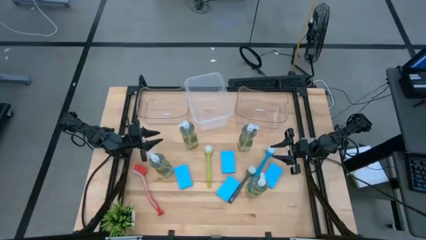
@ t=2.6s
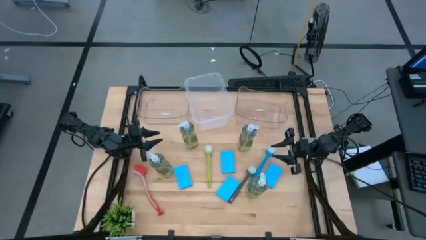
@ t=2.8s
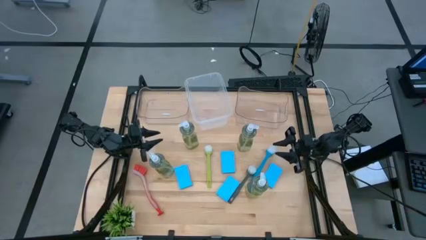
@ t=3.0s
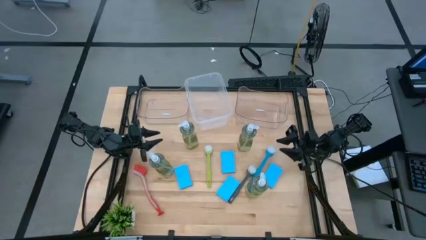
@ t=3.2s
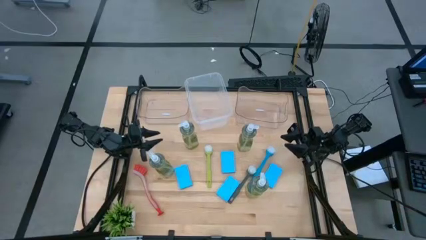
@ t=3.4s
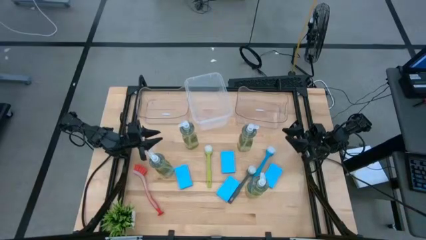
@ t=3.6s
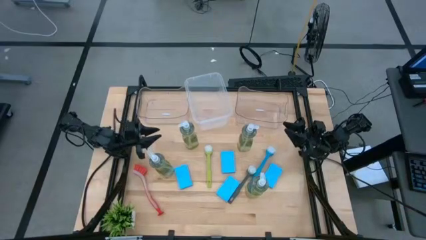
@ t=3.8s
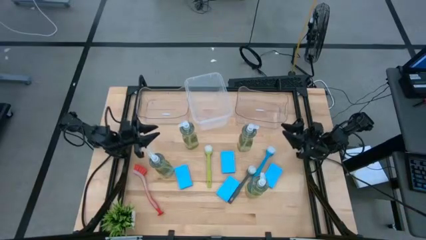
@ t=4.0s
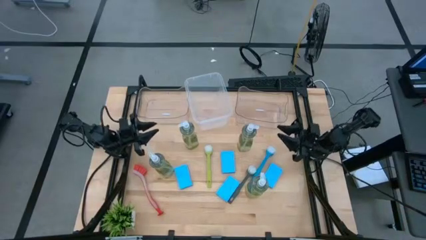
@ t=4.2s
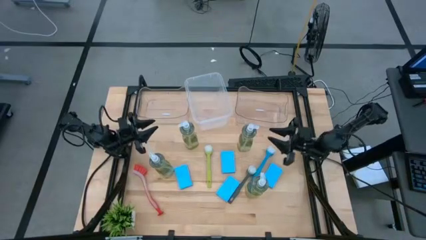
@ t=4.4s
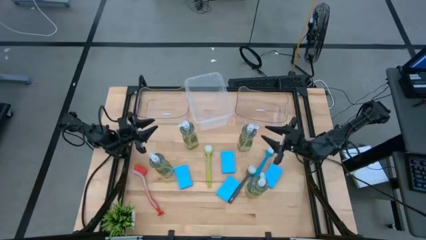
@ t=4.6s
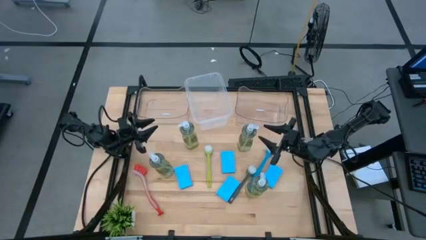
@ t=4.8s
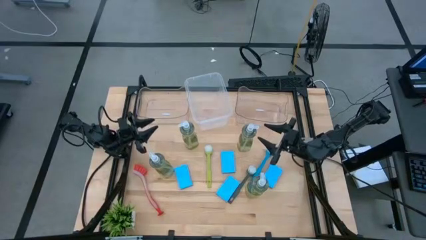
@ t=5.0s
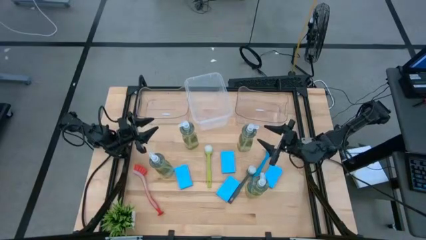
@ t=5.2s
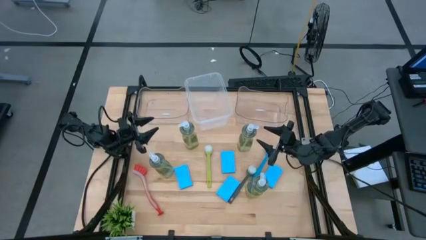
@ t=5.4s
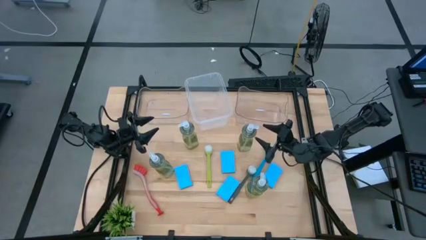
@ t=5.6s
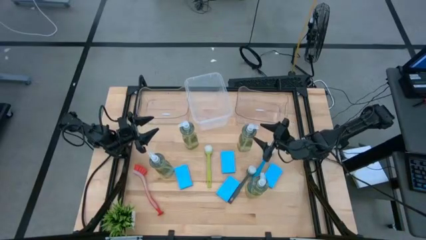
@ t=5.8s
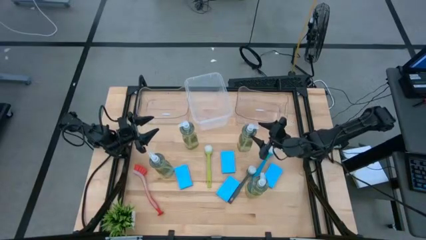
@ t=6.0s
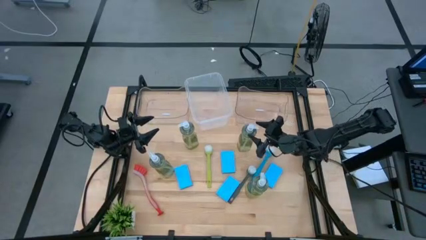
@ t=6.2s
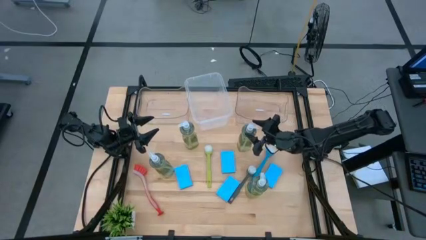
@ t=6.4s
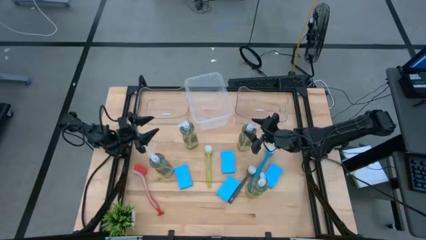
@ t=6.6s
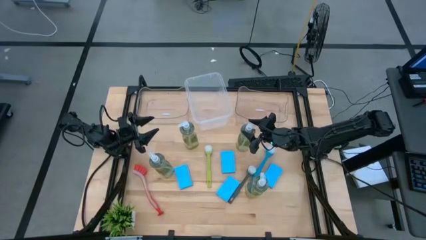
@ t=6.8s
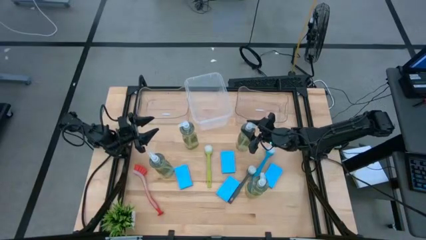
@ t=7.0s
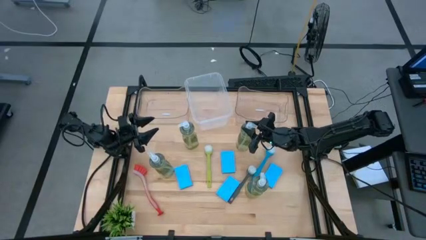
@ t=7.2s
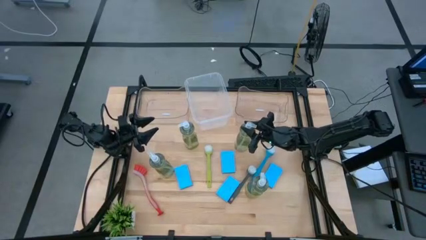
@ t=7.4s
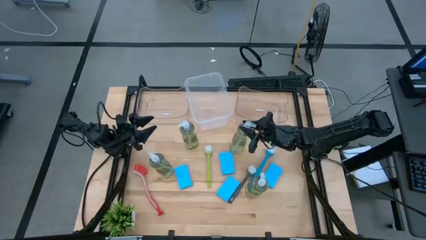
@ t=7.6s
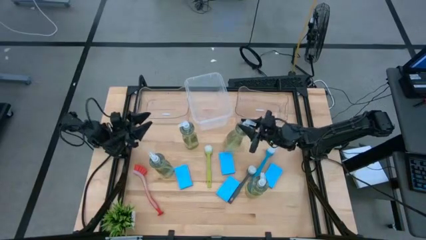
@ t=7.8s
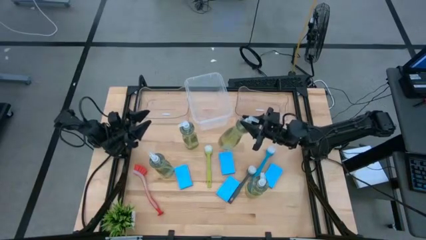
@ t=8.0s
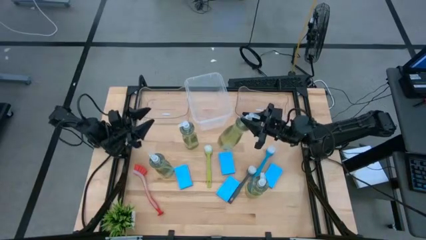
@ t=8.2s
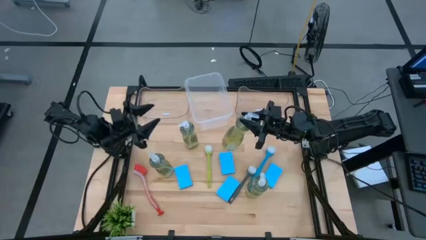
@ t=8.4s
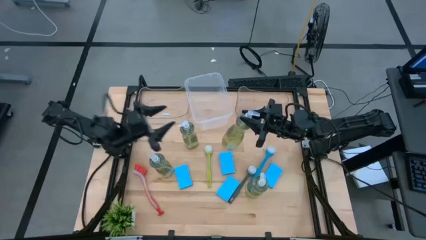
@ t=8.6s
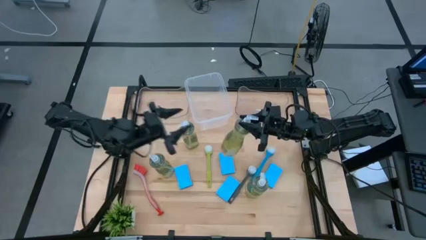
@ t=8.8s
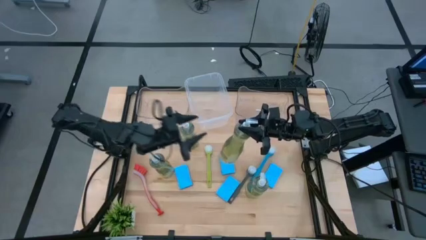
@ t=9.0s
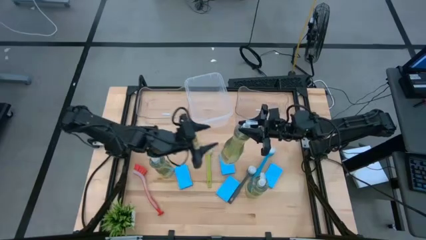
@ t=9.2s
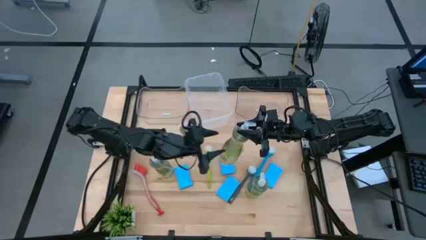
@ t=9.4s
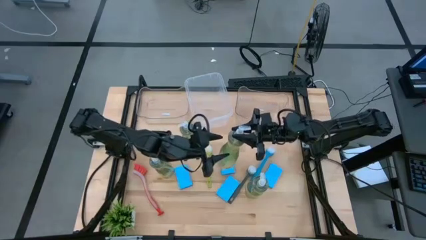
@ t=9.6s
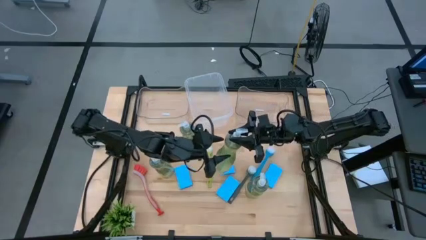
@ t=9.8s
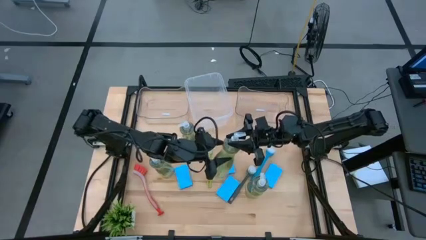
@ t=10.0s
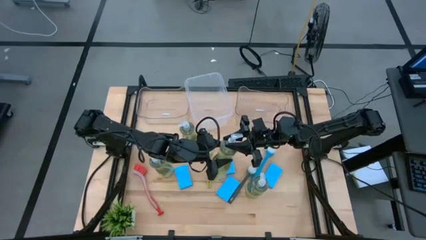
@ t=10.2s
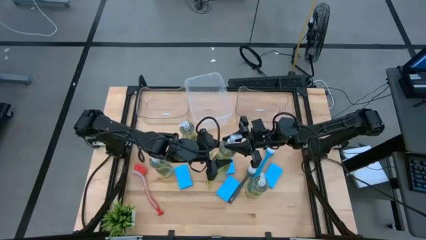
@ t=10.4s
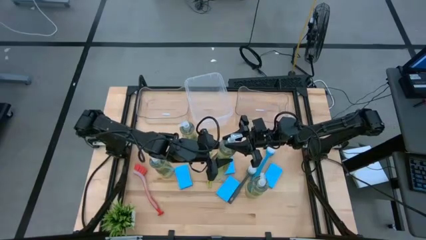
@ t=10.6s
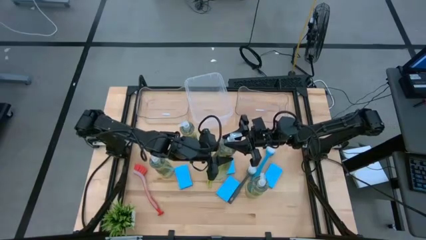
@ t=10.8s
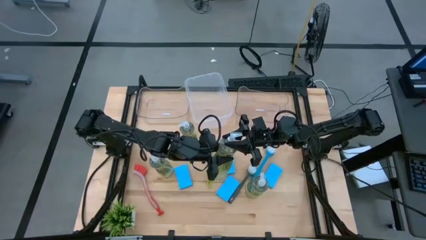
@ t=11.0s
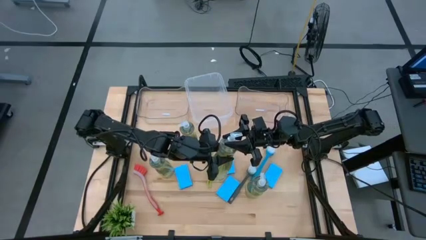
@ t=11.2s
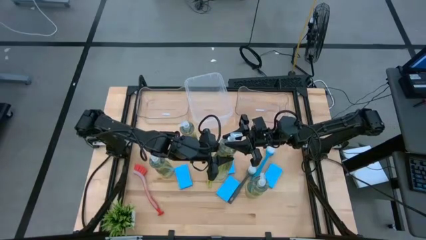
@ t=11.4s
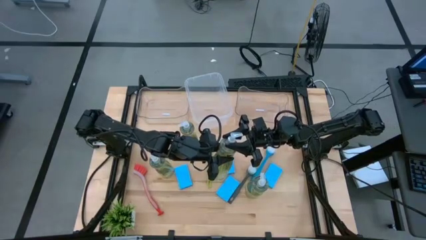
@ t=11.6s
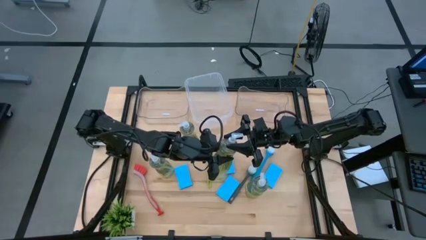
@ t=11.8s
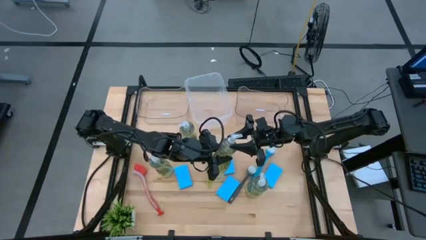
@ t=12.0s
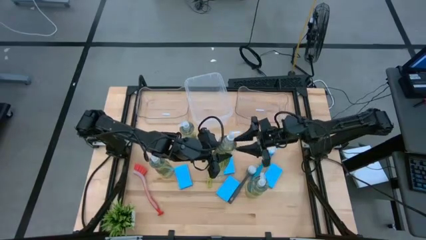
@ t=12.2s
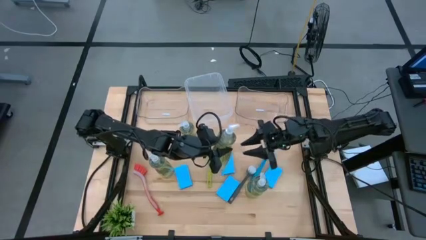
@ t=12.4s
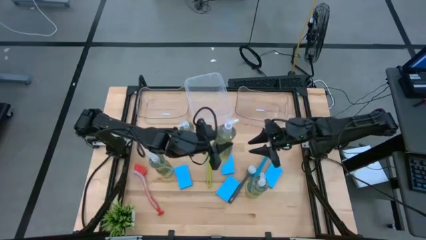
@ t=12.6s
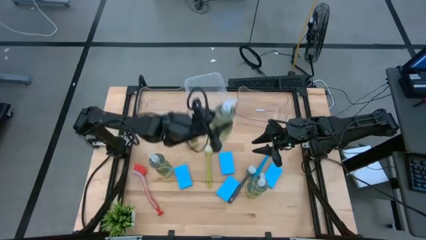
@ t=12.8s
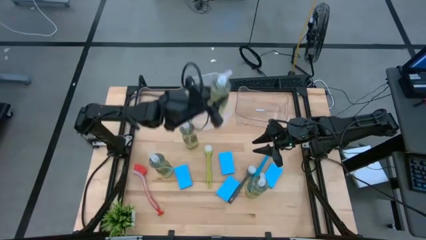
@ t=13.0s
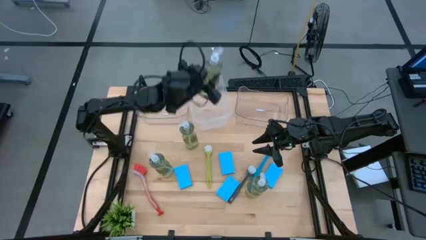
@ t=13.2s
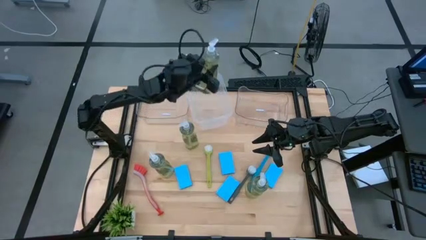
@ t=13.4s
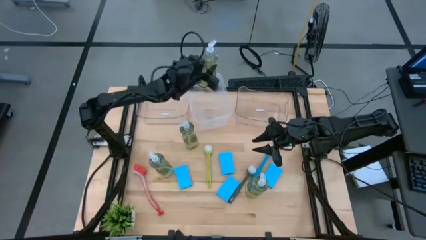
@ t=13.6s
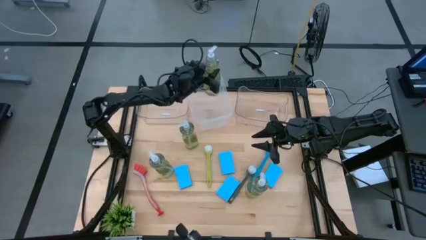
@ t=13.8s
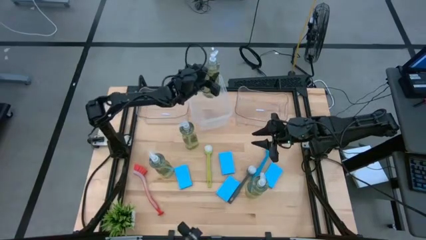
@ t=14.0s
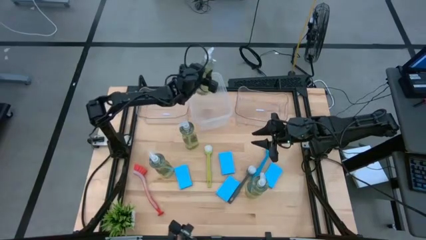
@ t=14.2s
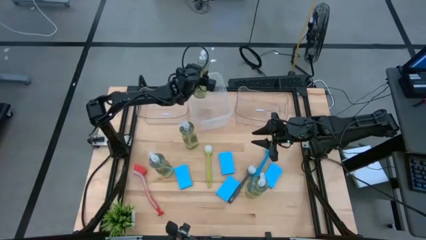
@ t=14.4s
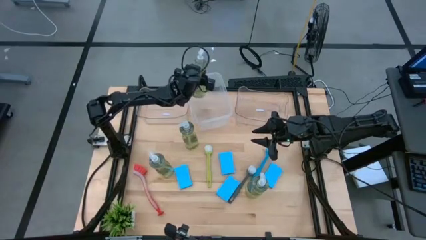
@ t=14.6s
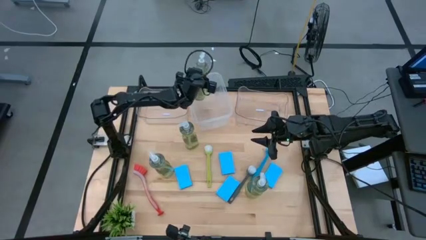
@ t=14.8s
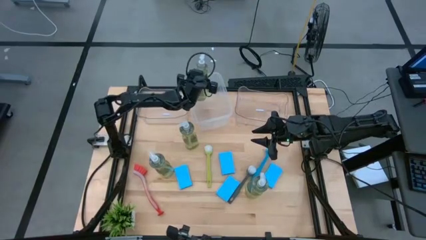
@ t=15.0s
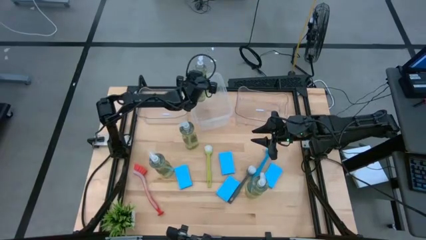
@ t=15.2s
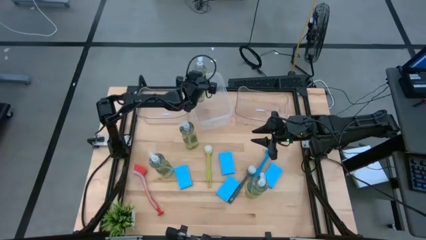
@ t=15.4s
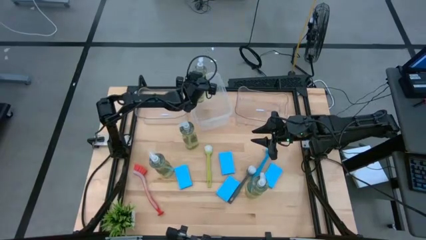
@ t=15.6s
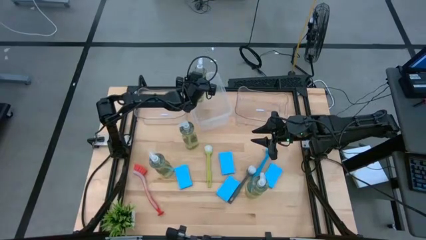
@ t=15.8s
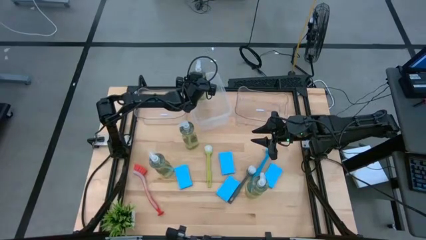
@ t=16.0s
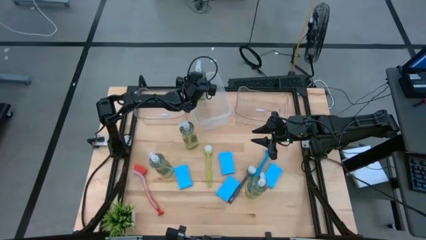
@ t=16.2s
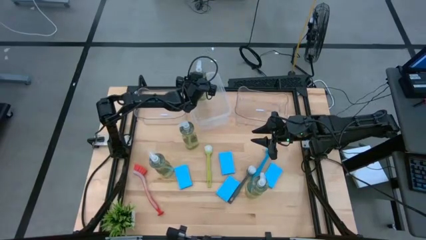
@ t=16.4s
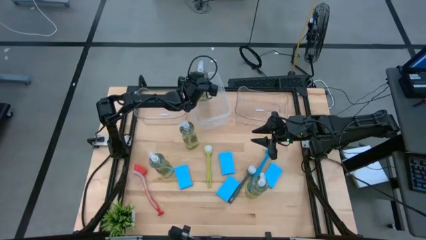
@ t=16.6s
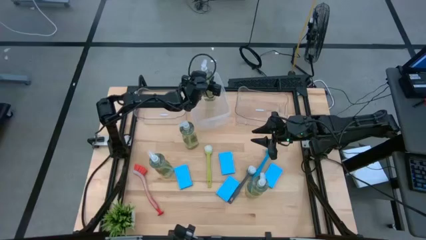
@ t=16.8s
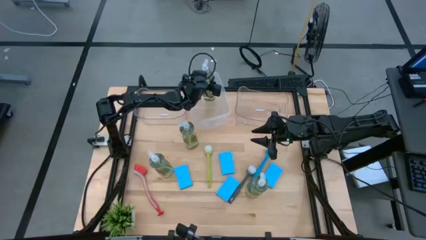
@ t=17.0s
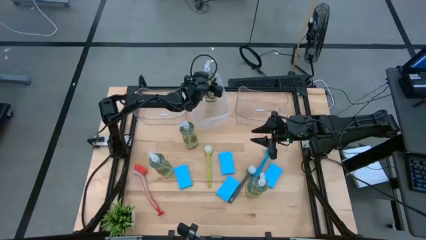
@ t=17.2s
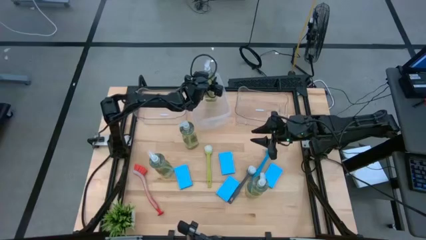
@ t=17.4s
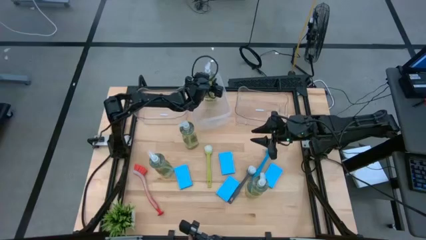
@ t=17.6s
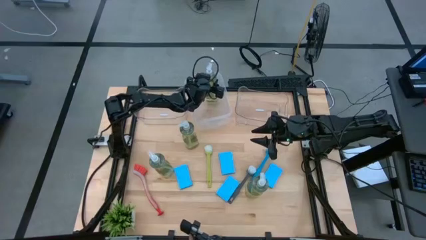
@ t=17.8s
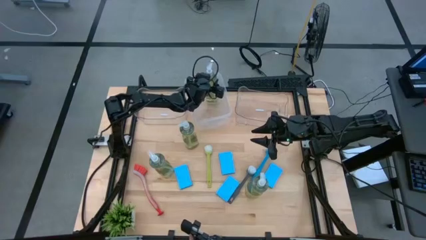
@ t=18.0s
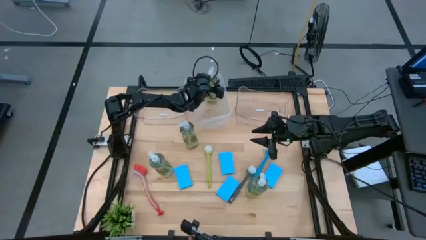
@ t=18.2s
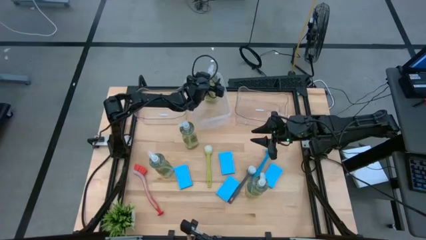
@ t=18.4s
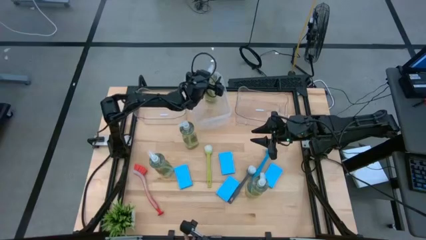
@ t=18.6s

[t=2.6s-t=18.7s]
Task: Pick & Place Kitchen Sink Supplies
Put the liquid dishwashing soap into the middle transparent bin
